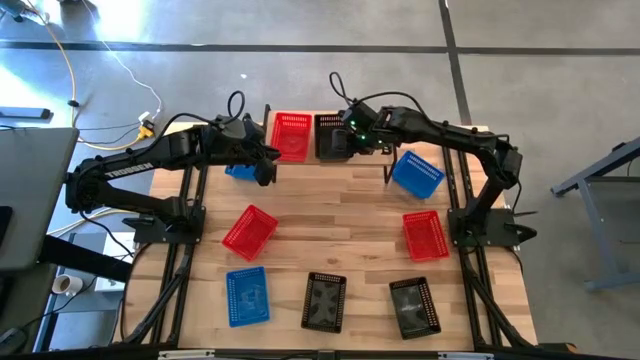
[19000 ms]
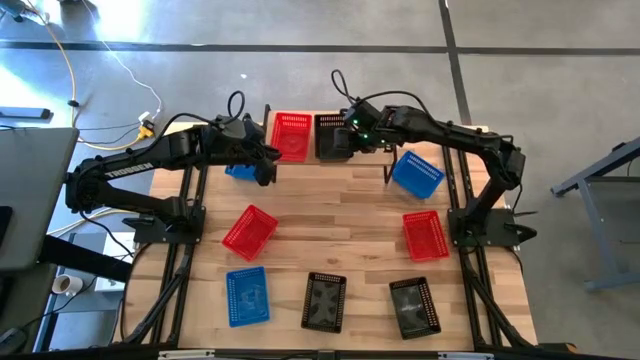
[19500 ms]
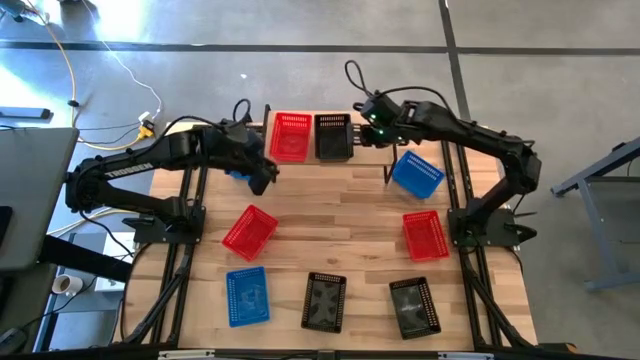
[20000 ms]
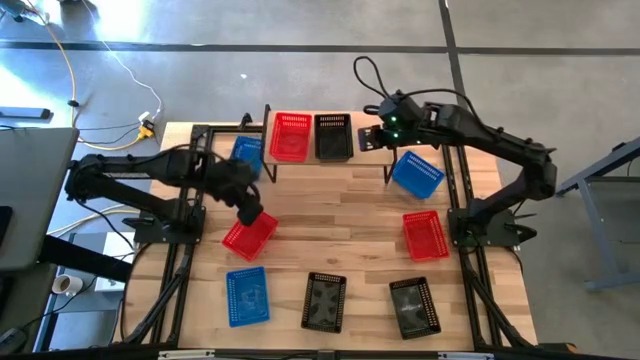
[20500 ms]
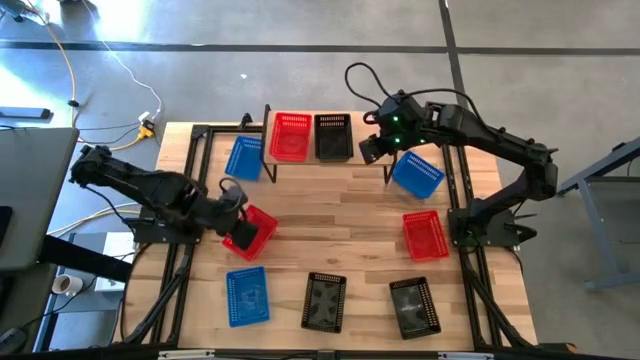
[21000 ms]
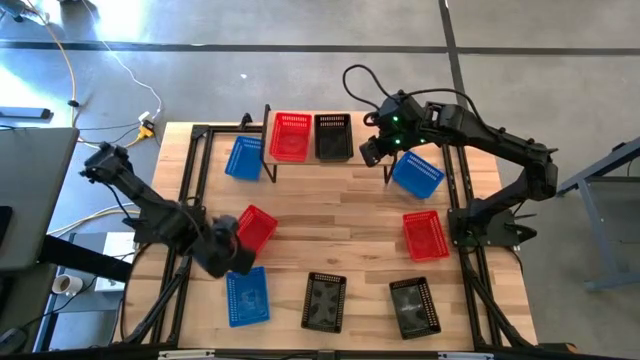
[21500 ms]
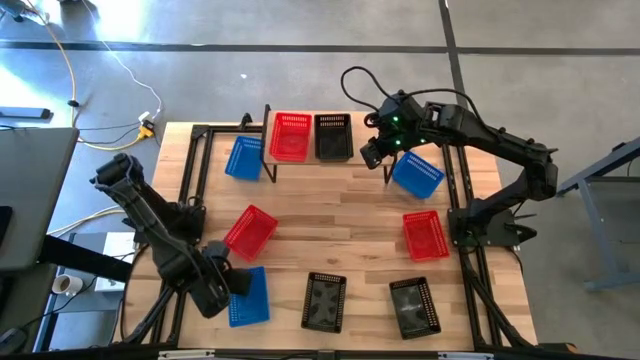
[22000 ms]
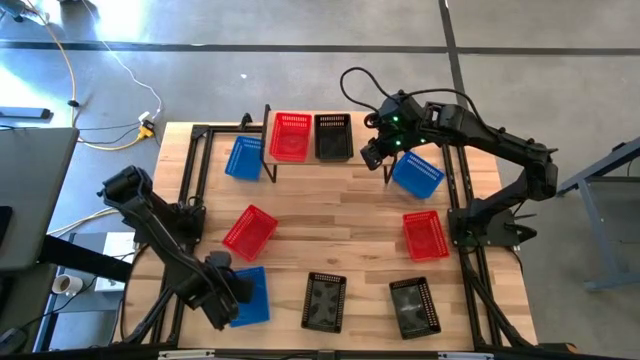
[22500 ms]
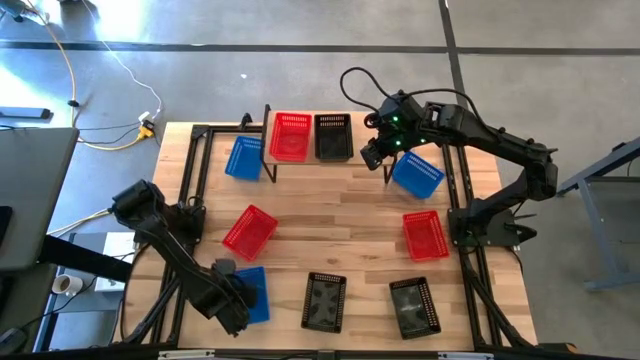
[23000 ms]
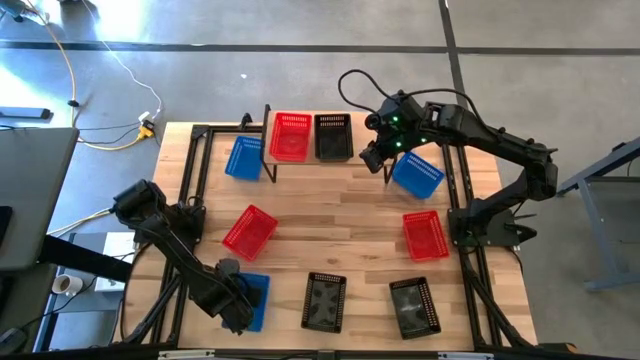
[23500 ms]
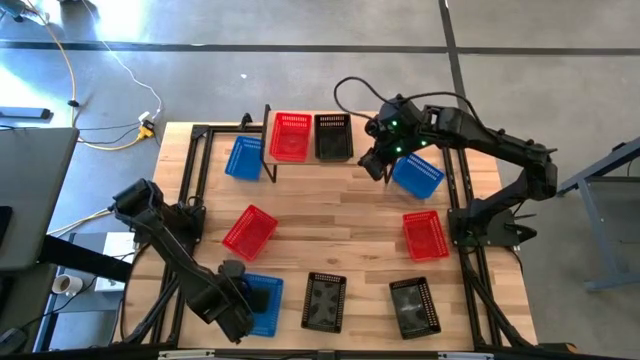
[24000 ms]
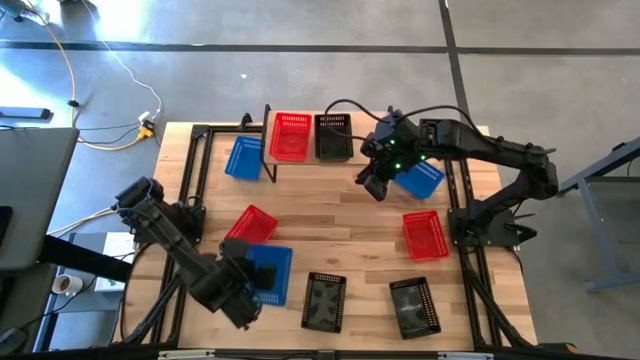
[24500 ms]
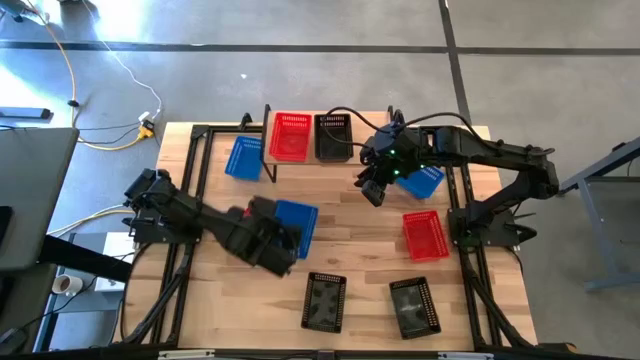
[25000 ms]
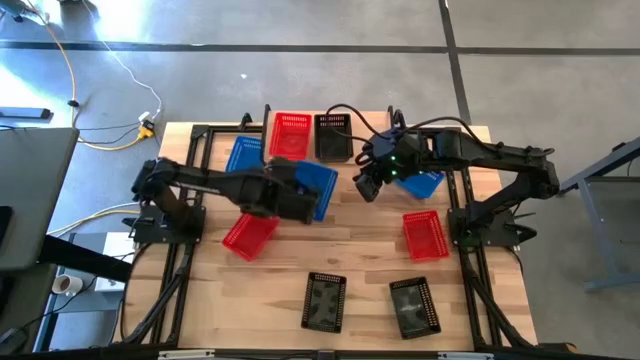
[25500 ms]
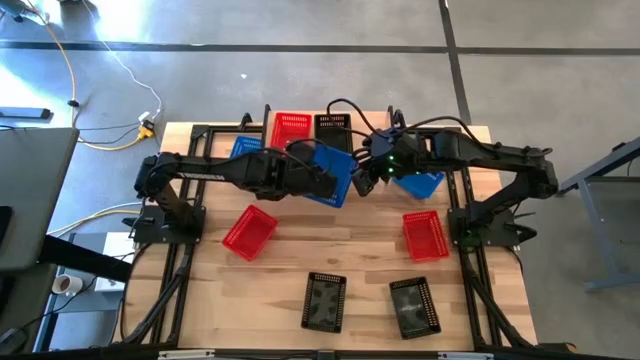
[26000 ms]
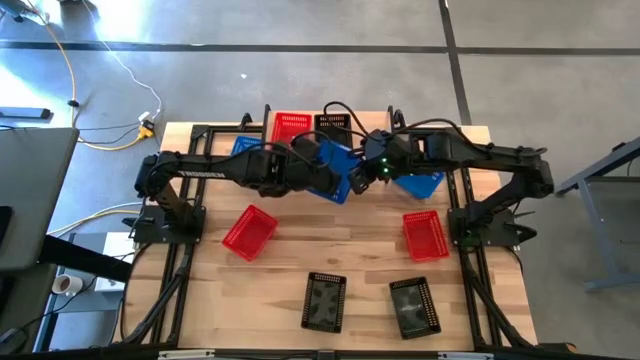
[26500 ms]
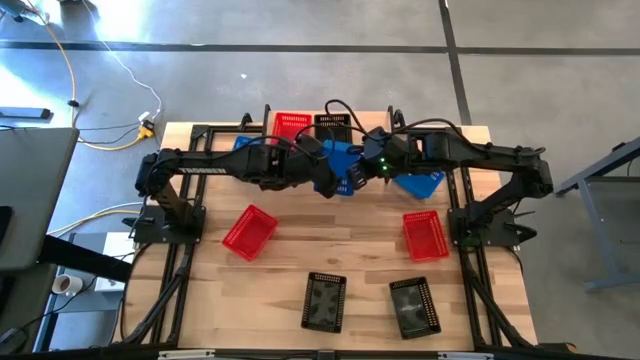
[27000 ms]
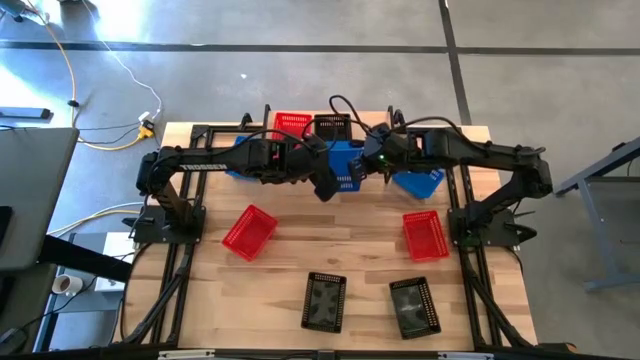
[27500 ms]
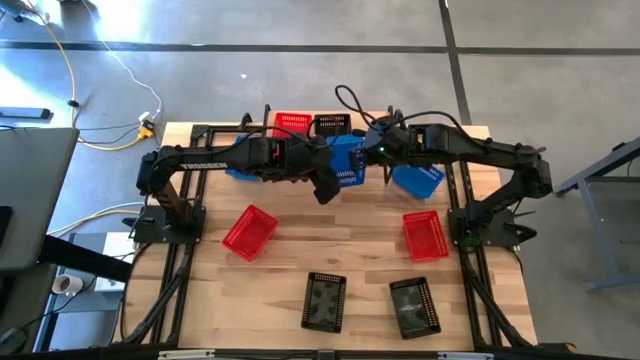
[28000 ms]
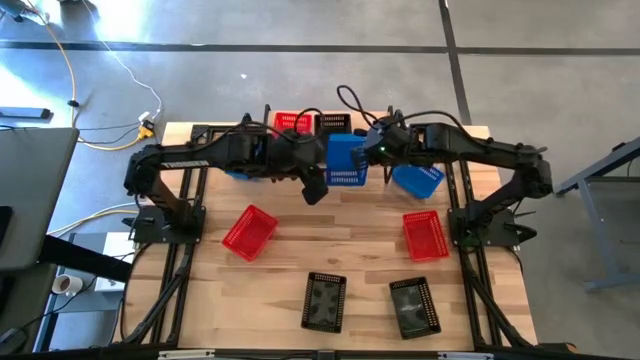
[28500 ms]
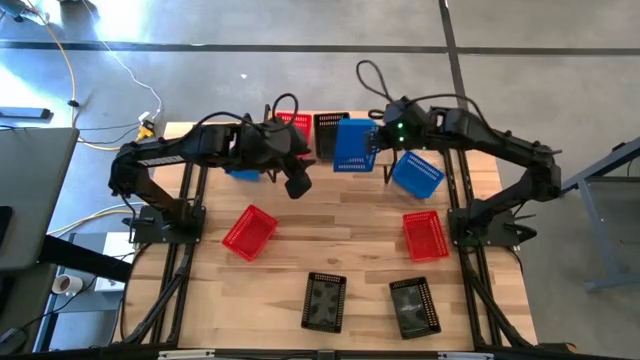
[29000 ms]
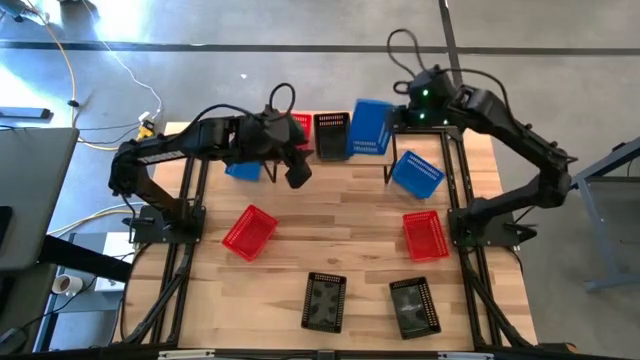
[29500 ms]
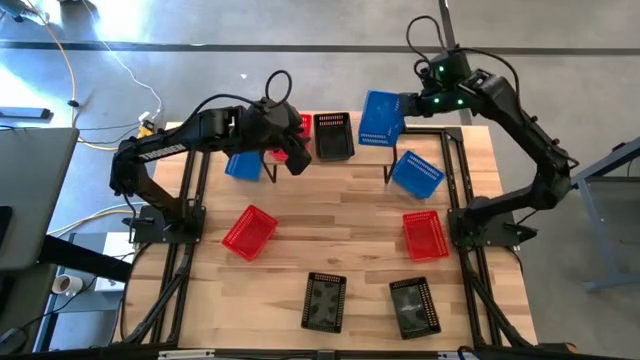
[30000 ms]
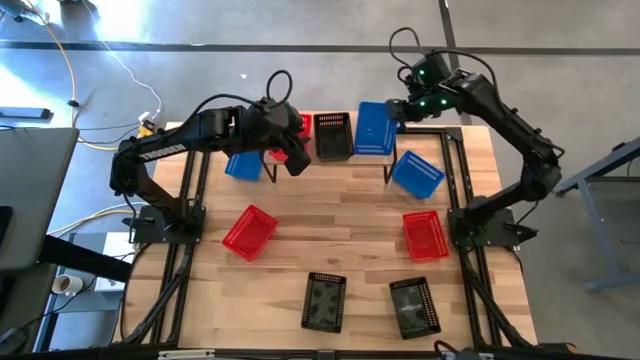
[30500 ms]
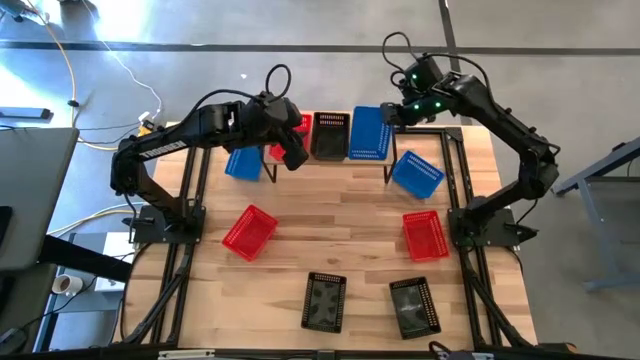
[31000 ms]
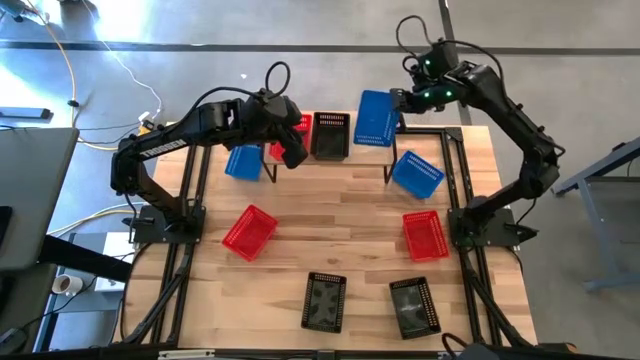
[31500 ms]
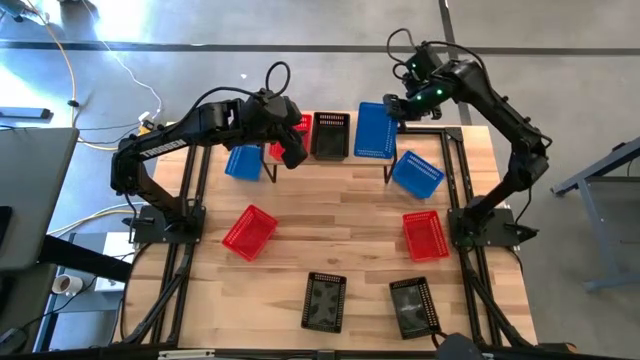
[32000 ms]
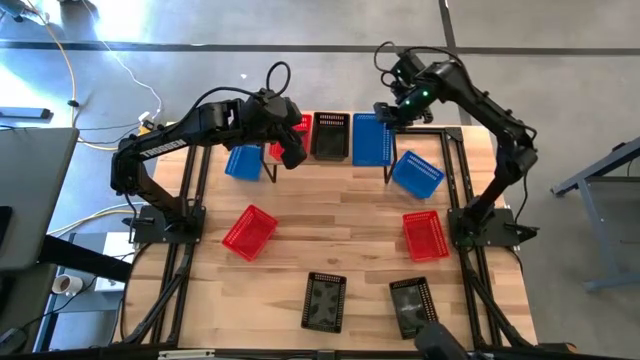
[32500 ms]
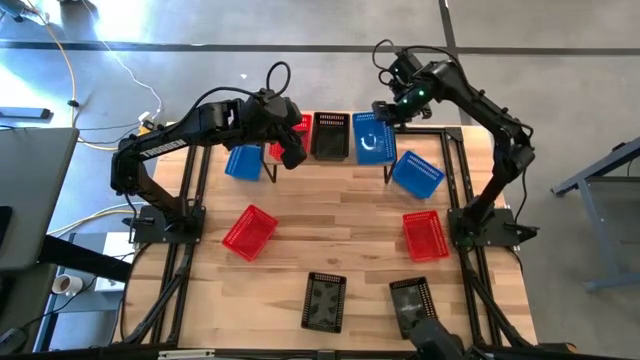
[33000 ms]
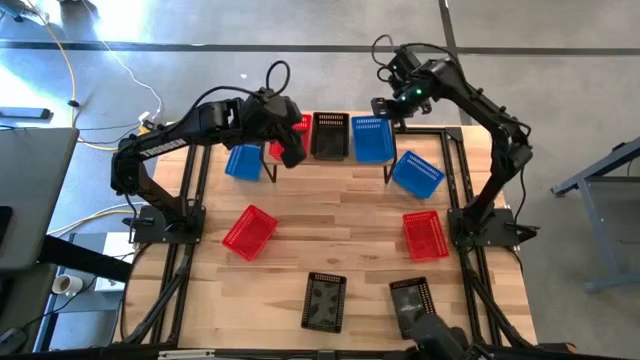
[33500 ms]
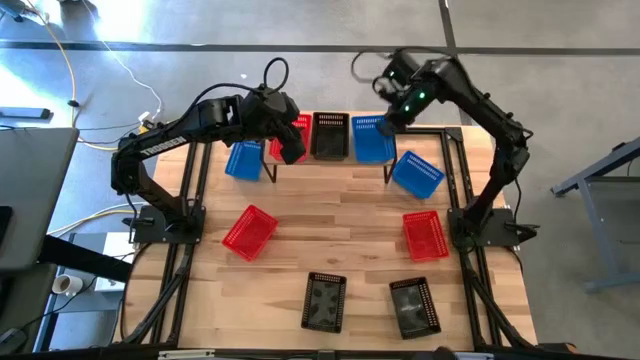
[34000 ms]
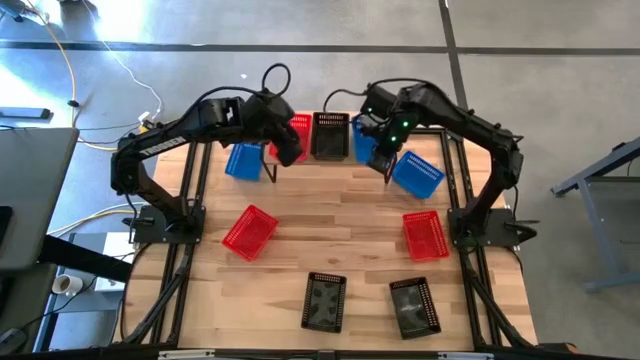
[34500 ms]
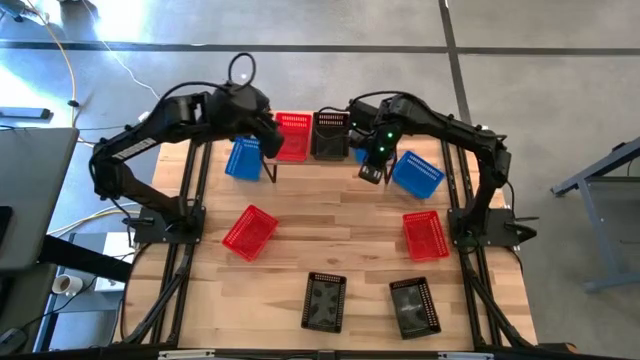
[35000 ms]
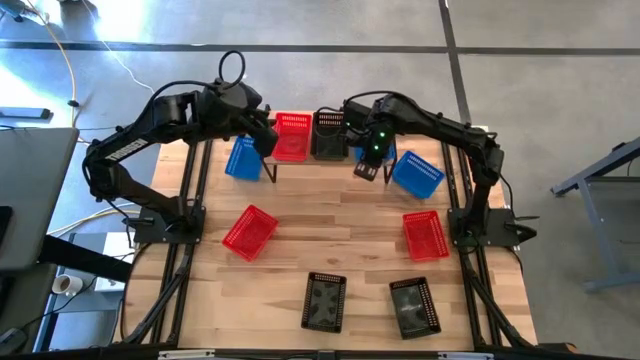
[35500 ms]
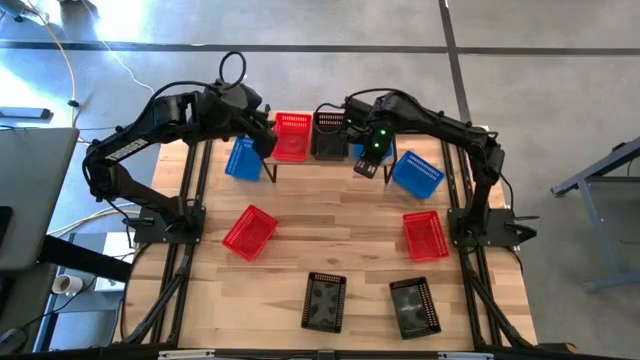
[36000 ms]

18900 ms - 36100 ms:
Task: Stack baskets on shelf by color
Put the bottom blue bin on the shelf

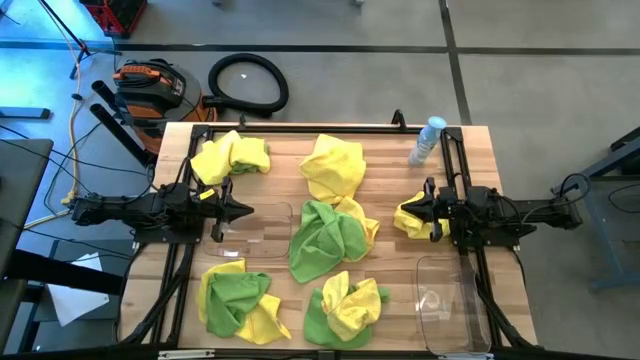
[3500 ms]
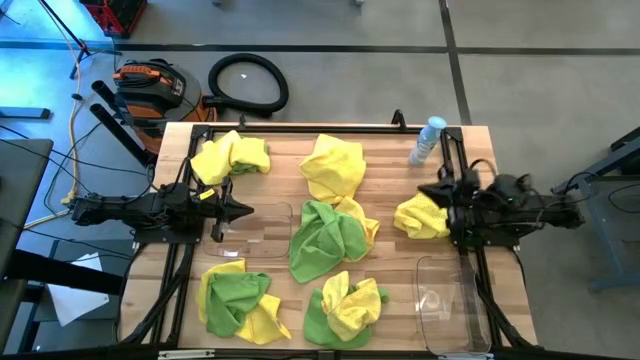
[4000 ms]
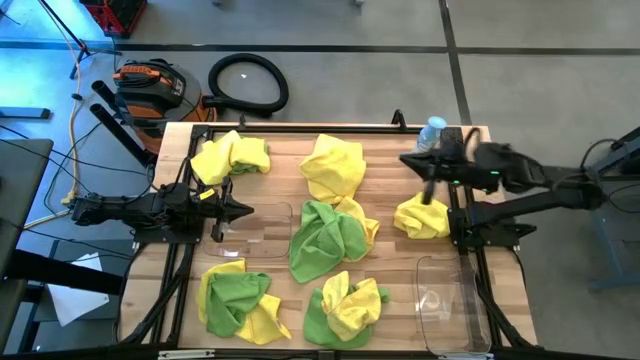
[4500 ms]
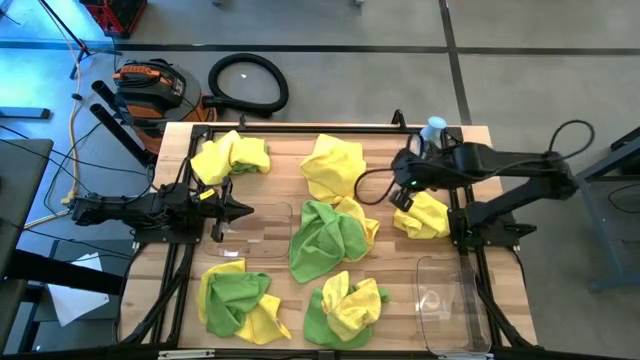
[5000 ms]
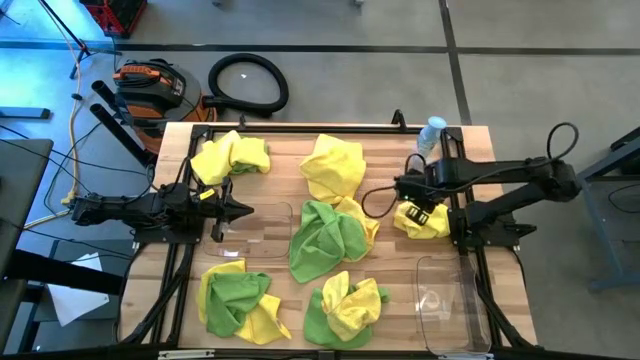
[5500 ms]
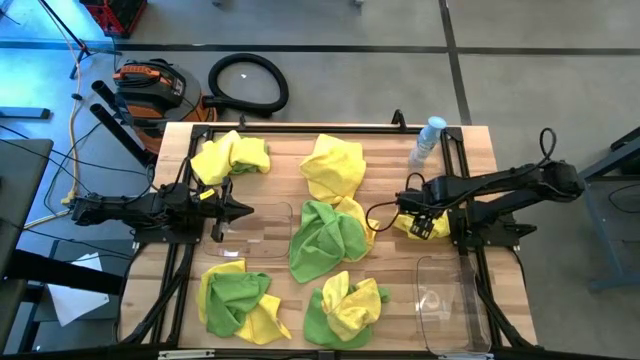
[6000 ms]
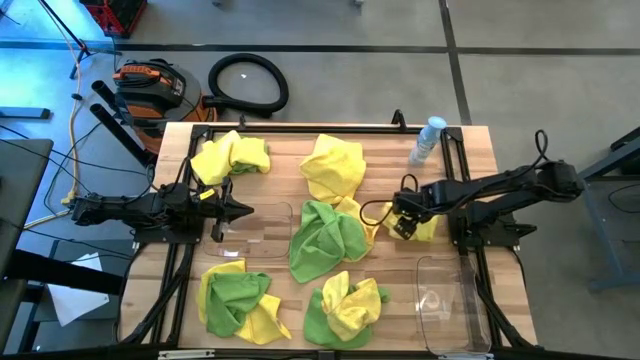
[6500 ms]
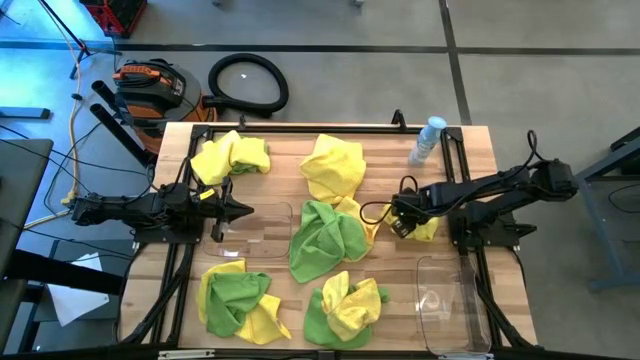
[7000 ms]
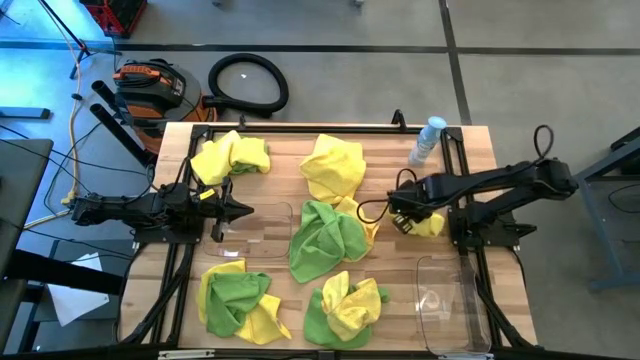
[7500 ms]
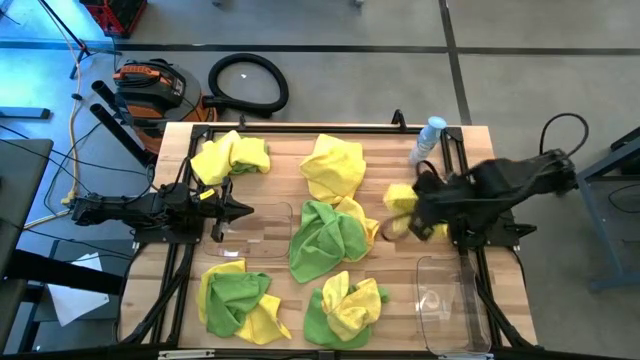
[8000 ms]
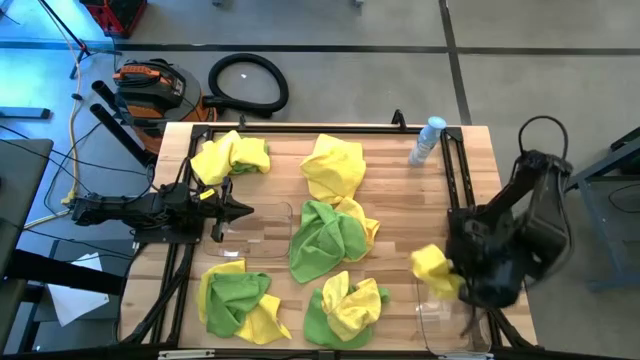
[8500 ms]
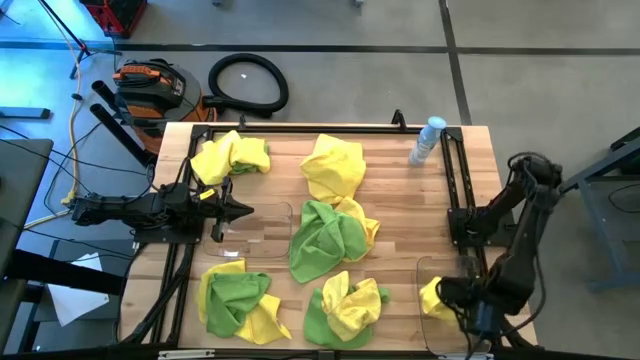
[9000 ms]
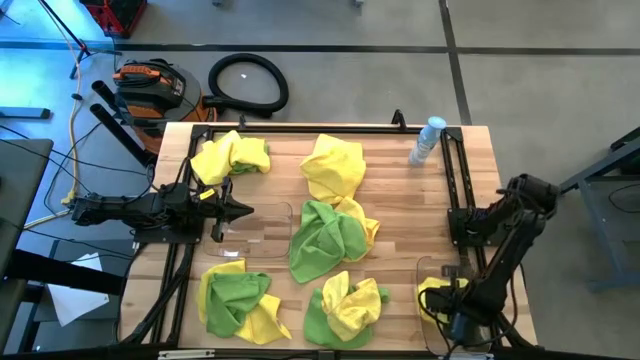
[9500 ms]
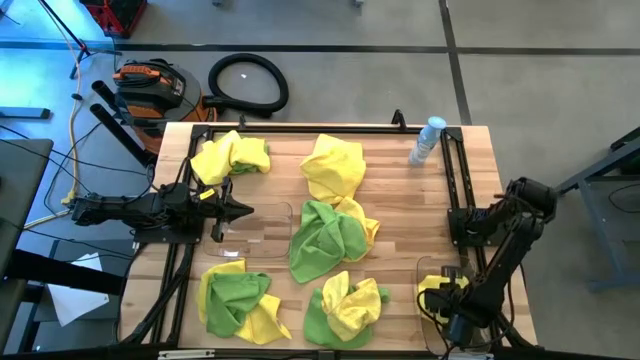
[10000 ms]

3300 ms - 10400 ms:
Task: Sort microfiber towel by color & place in baskets
Put the yellow towel into the right transparent bin
